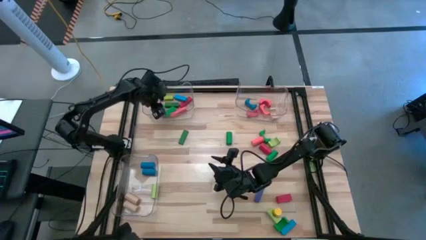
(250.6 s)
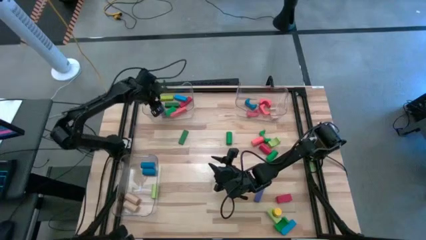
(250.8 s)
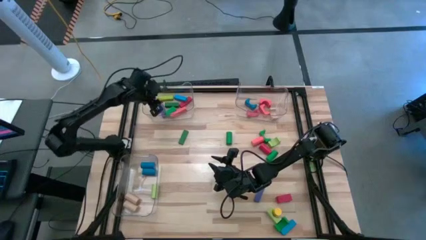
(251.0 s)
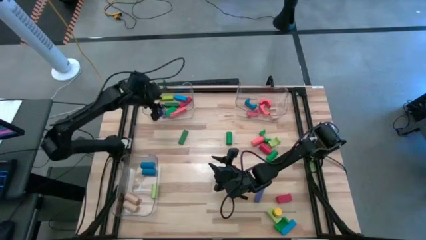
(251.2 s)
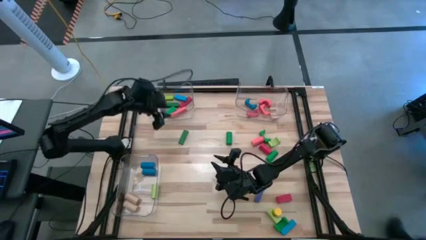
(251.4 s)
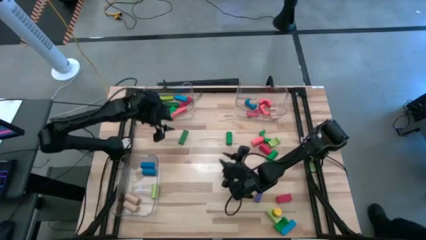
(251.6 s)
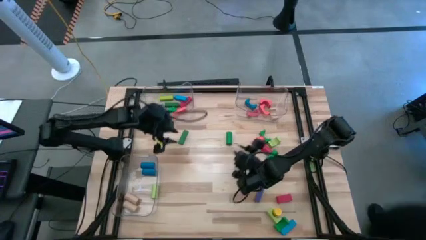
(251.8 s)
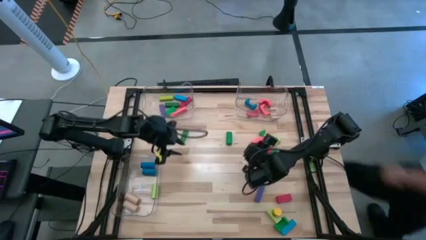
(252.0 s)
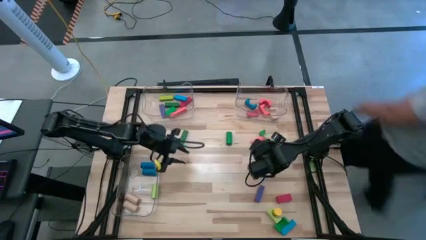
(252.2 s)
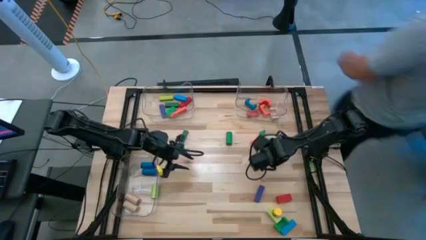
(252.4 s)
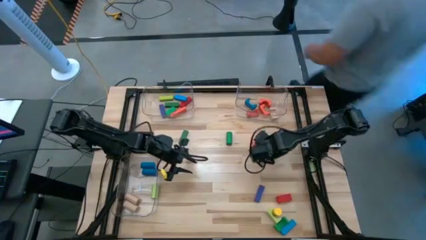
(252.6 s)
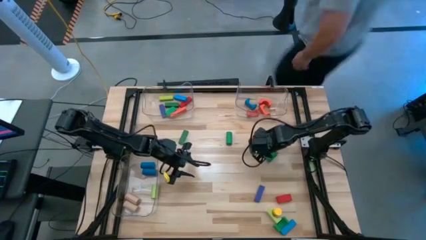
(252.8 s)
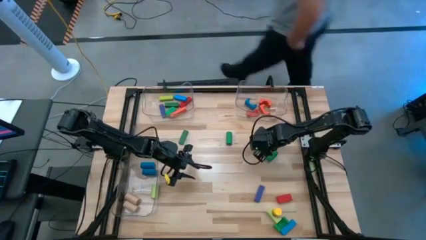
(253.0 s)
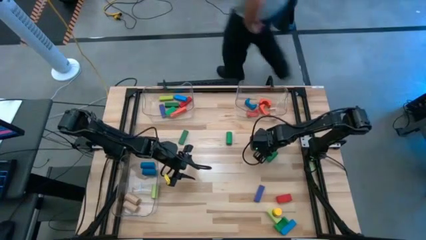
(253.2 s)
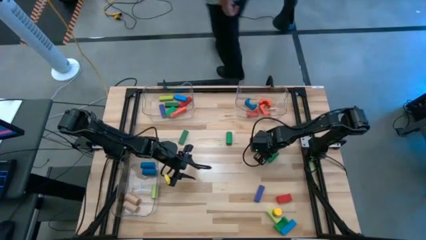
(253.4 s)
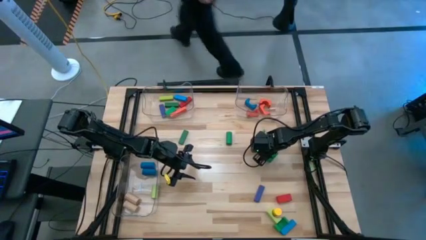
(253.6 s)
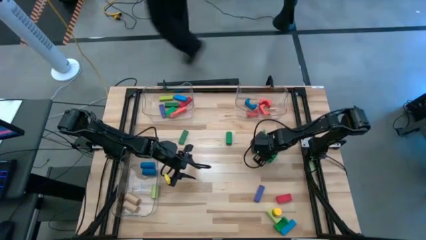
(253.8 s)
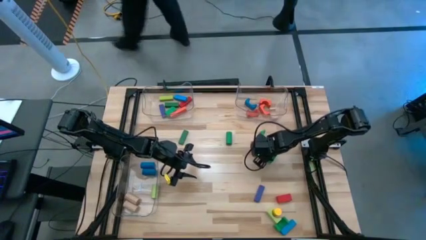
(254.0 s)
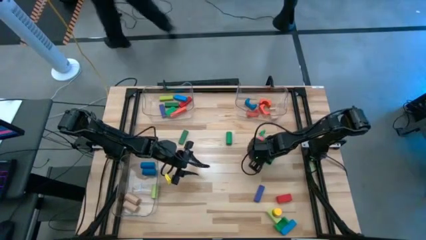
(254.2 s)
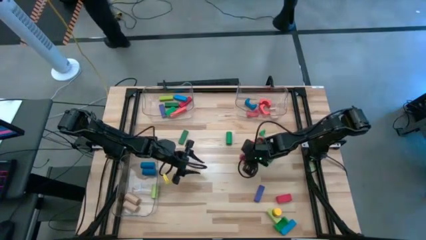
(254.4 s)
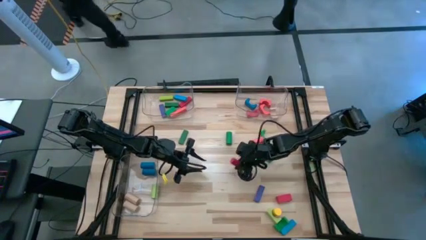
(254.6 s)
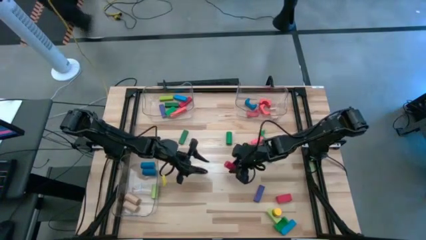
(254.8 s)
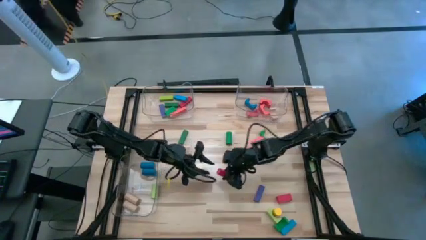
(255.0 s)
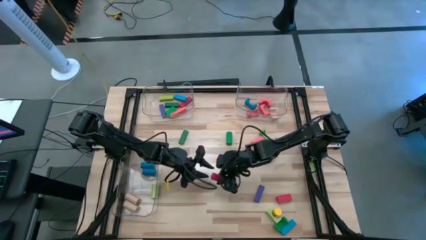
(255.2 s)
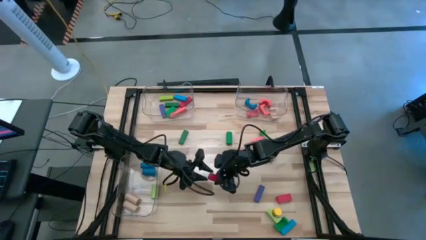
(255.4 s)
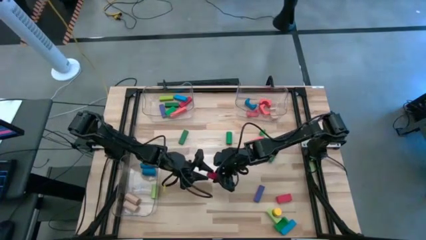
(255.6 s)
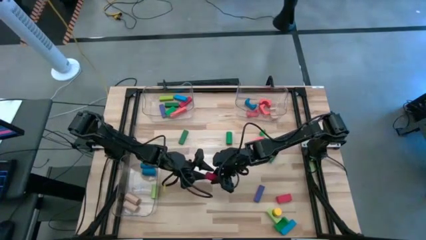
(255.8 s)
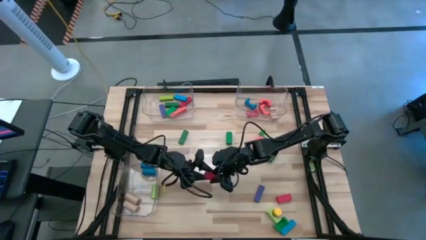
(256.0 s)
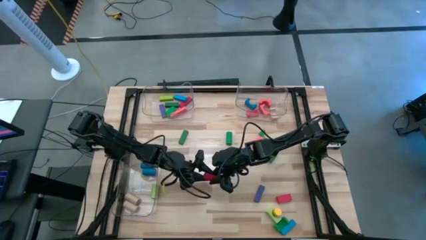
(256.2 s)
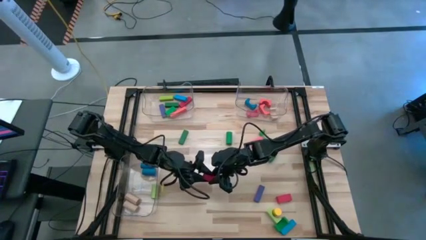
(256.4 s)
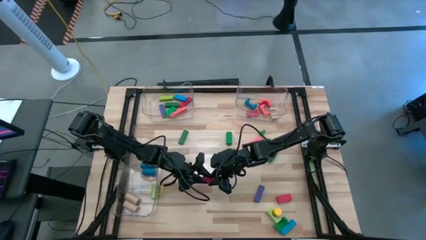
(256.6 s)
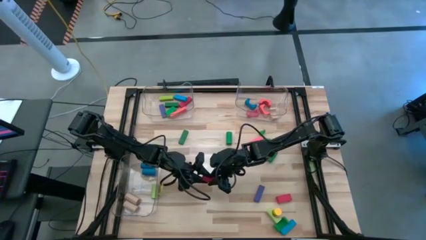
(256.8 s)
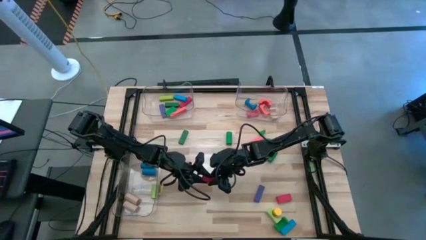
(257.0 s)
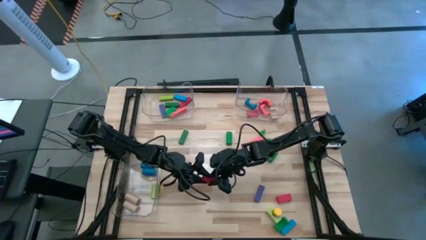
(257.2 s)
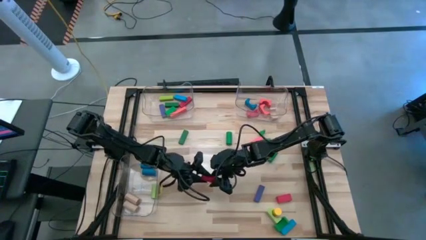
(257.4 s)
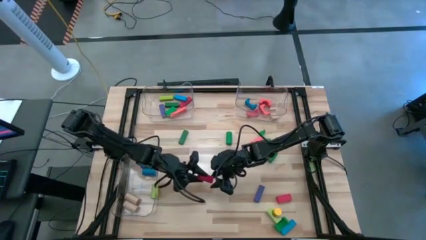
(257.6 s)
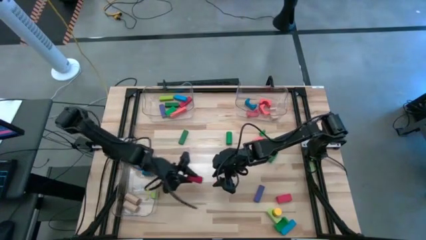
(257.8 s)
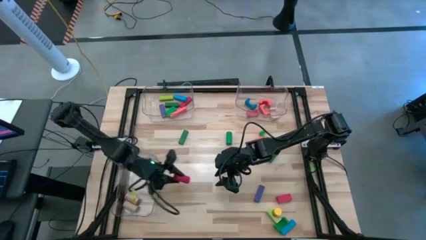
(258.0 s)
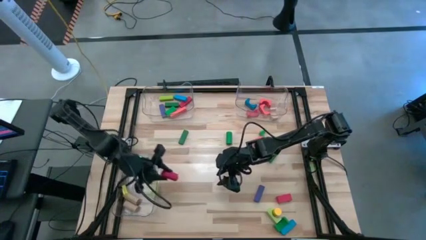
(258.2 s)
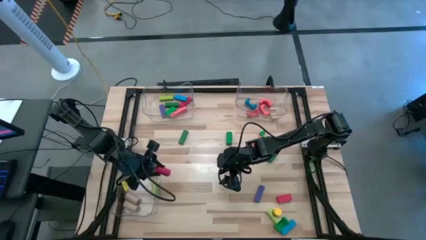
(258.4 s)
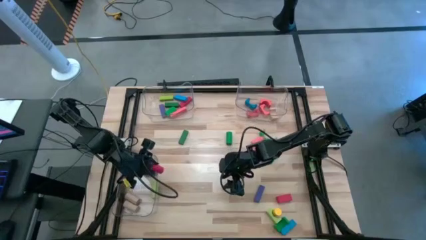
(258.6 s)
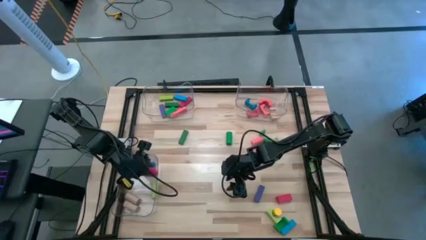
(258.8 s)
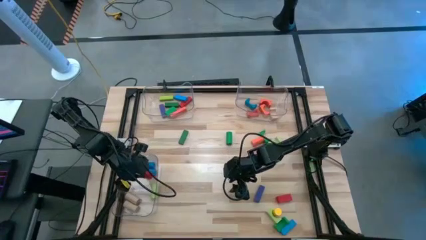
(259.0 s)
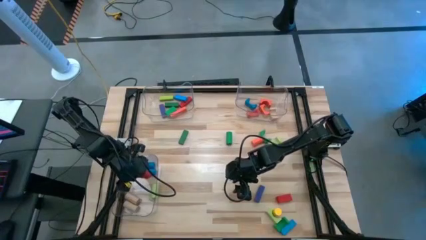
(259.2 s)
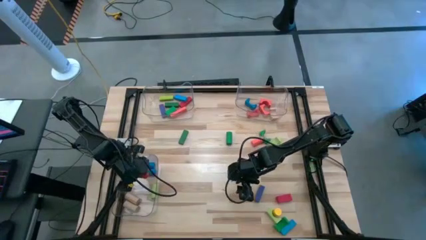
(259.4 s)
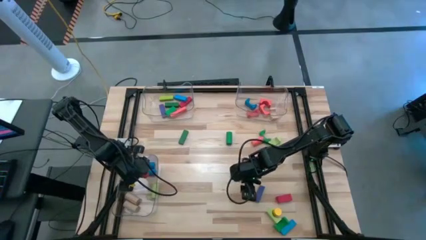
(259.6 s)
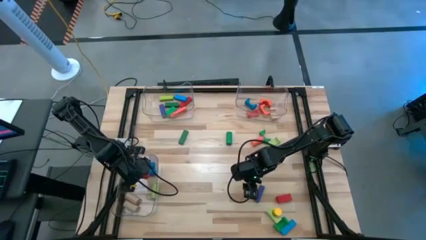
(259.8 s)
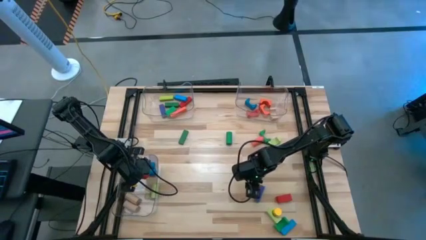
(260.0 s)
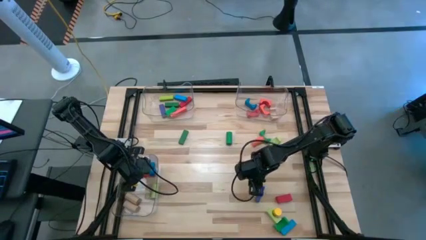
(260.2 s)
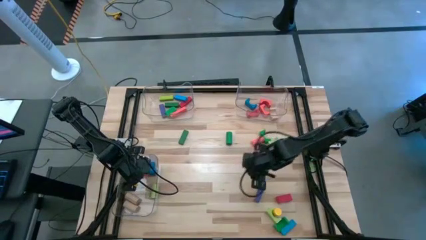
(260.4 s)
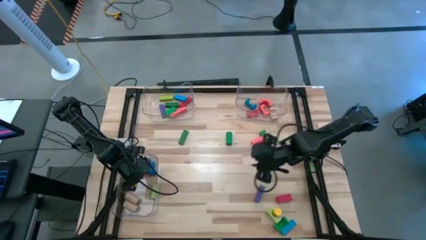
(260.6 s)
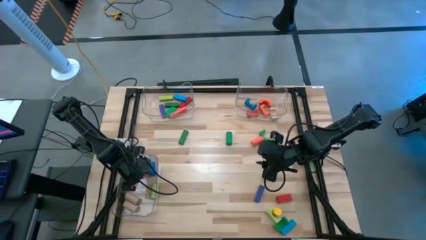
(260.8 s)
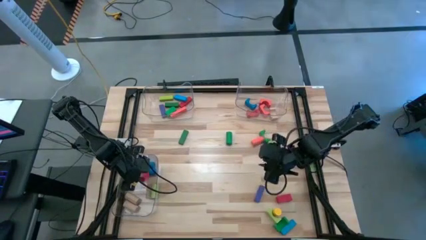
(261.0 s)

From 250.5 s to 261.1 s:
Task: Sort blocks by size
Put the red cylindrical block into the bottom left transparent bin

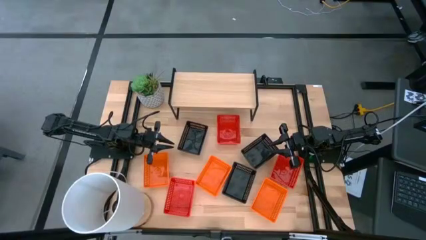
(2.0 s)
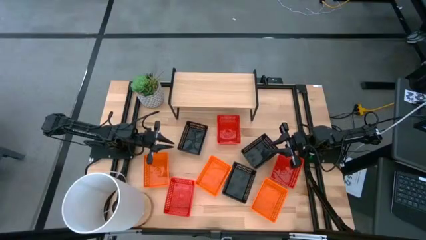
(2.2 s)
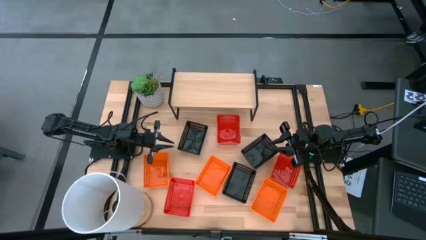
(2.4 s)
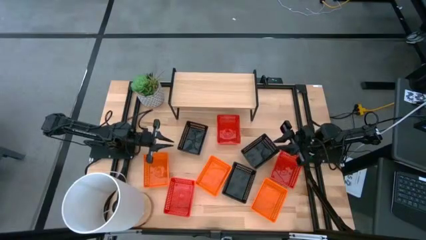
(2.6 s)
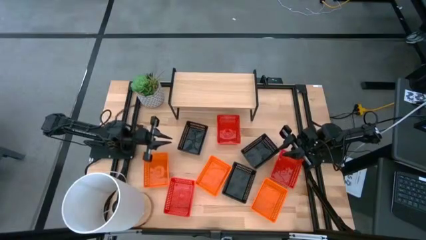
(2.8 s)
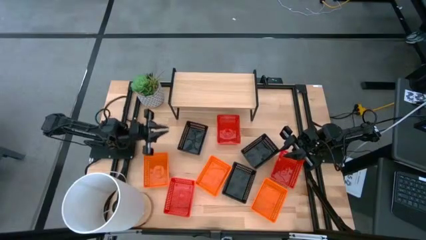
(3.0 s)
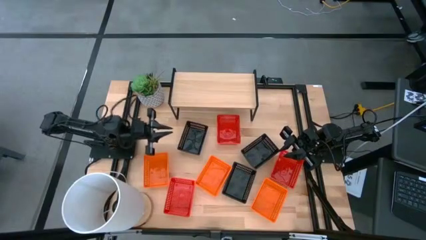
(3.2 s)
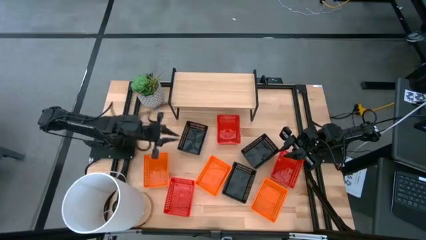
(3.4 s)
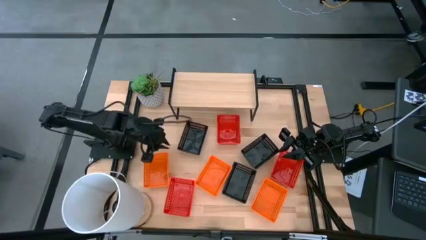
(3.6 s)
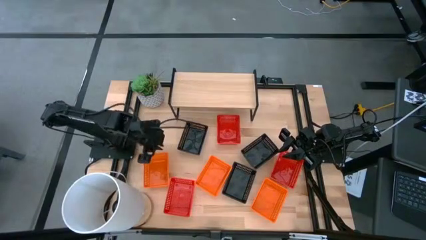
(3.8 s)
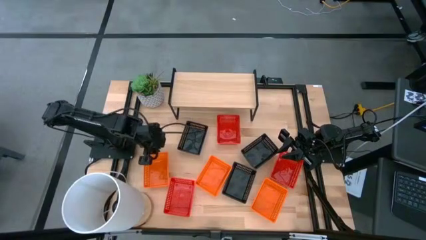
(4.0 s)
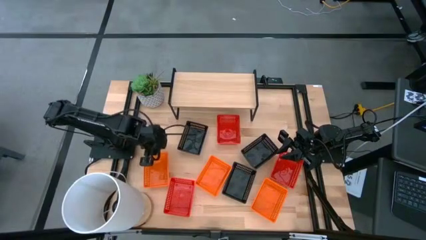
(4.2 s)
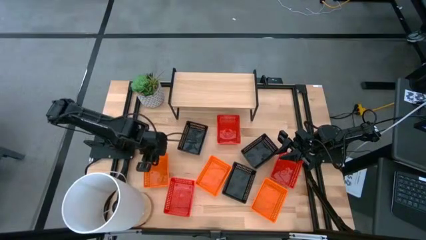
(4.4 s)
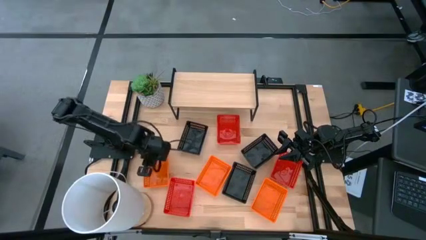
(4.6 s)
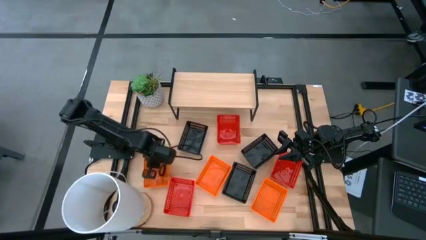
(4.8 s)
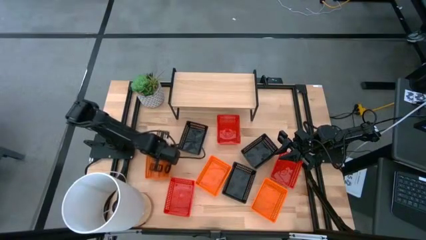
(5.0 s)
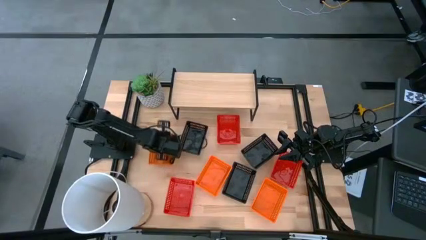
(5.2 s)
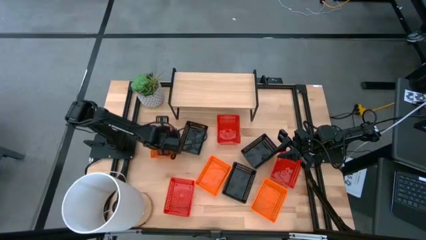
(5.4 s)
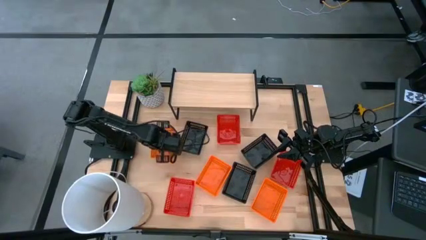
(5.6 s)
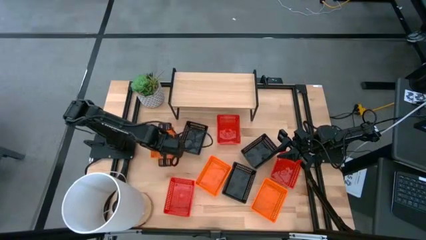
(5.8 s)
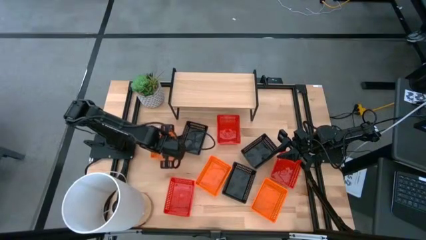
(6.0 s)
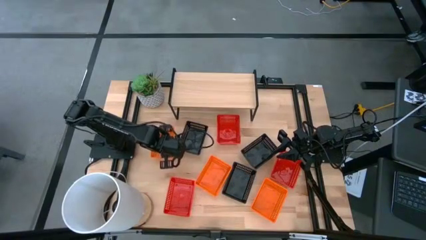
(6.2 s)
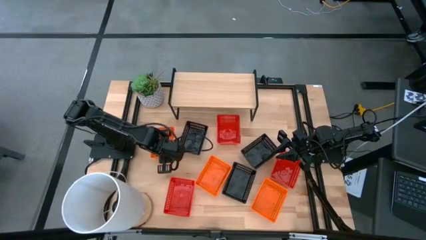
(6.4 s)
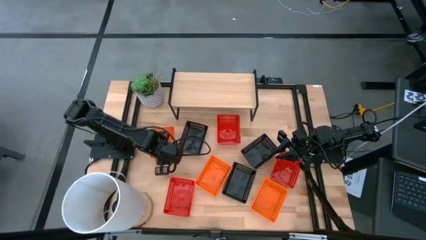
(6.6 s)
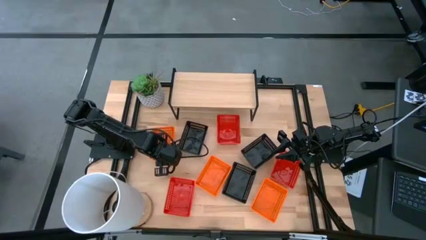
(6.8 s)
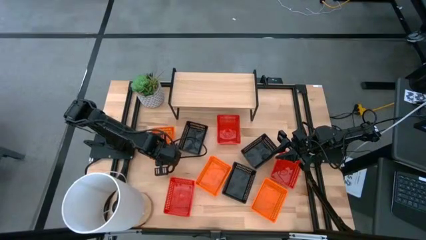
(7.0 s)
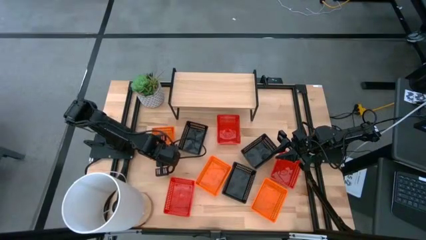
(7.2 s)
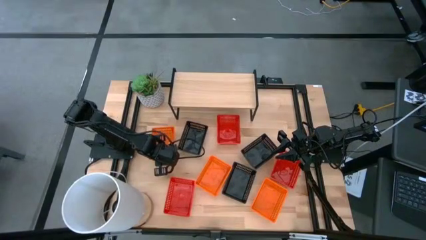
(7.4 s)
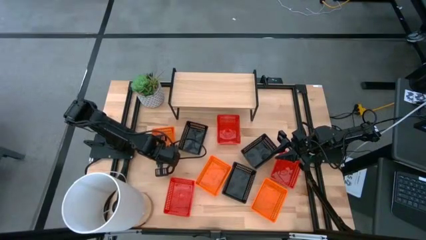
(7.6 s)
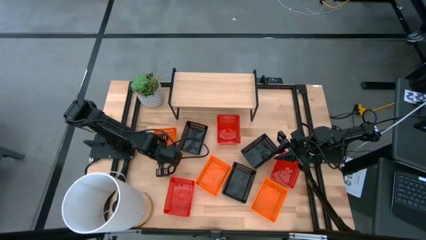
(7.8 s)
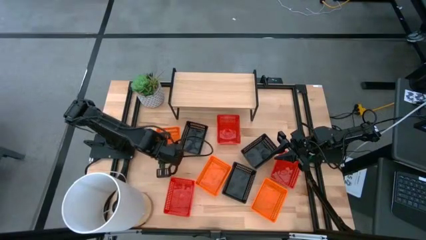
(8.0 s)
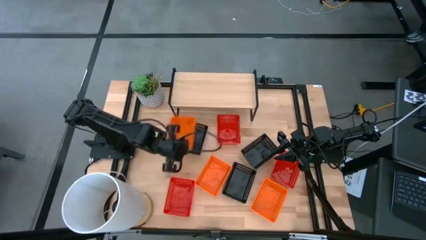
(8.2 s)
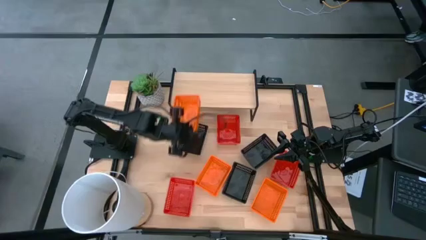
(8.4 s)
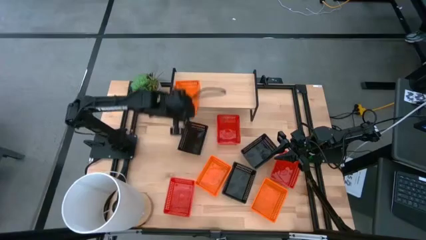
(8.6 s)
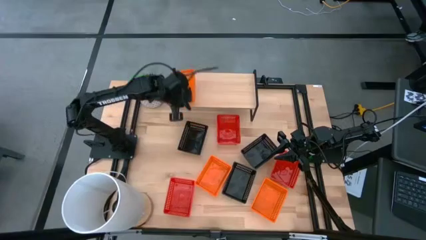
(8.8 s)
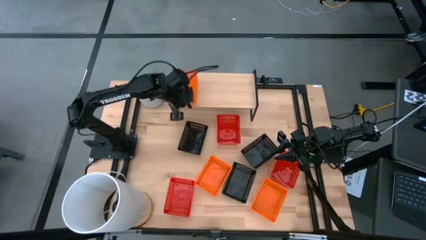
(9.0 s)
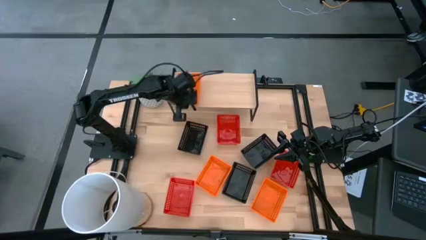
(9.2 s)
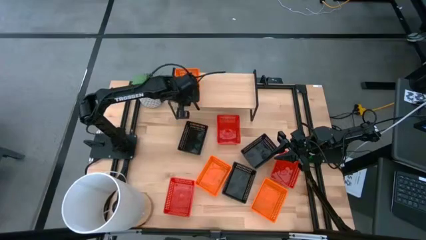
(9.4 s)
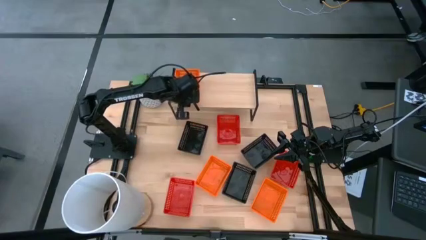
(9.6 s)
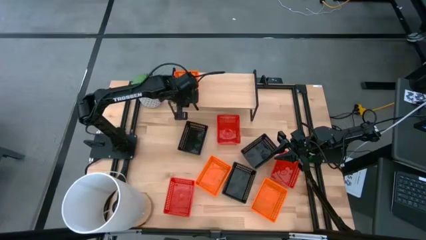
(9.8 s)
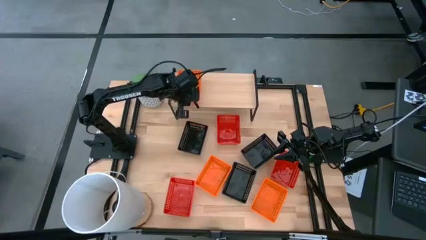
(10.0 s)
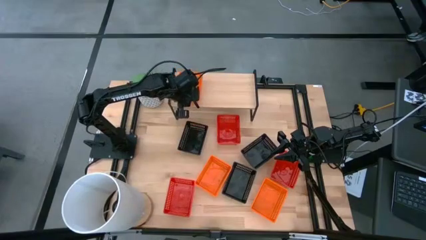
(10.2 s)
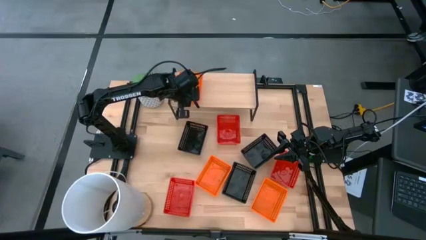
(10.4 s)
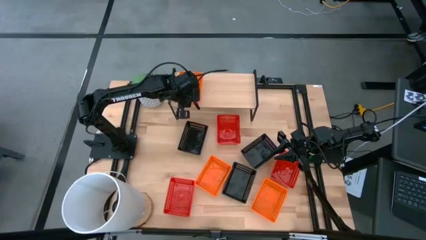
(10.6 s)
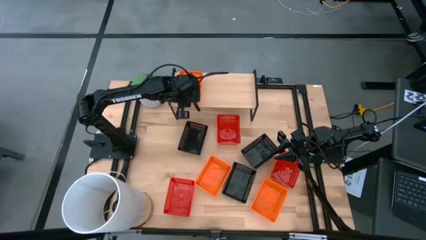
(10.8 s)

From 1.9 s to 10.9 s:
Task: Stack baskets on shelf by color
Put the left orange bin on the shelf
